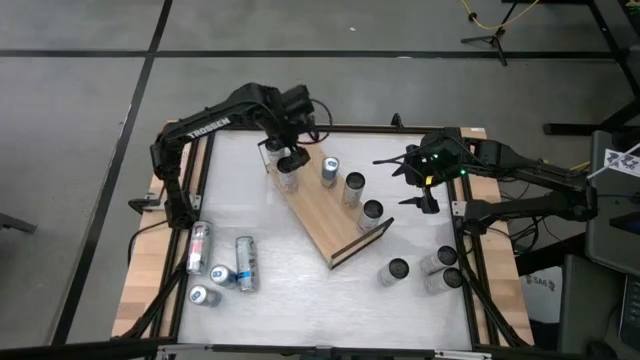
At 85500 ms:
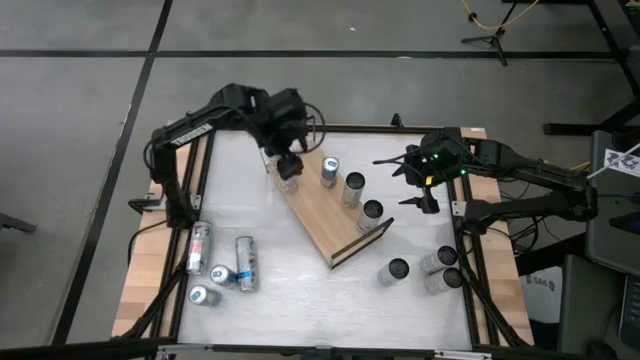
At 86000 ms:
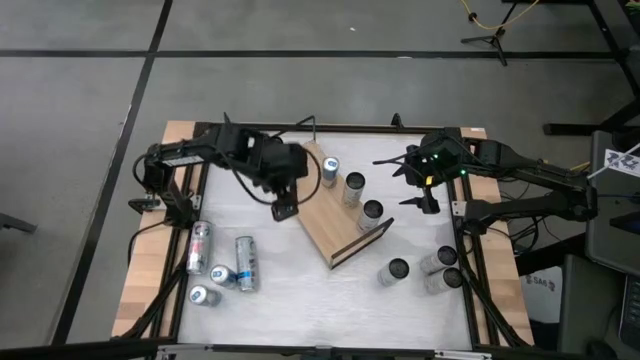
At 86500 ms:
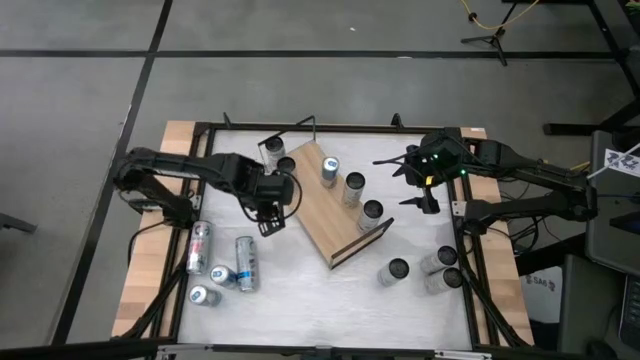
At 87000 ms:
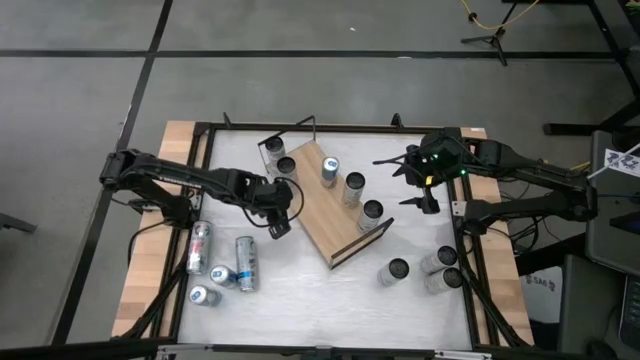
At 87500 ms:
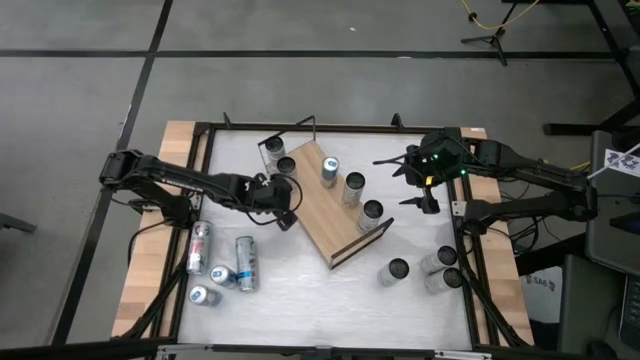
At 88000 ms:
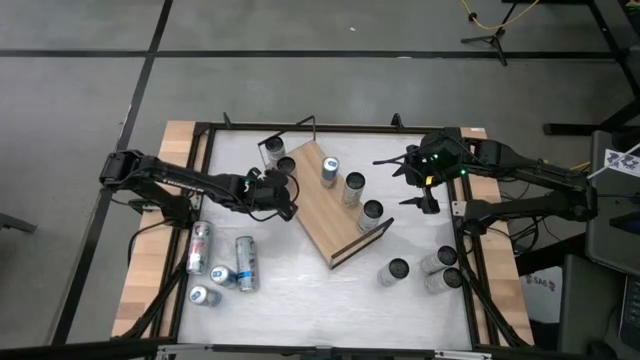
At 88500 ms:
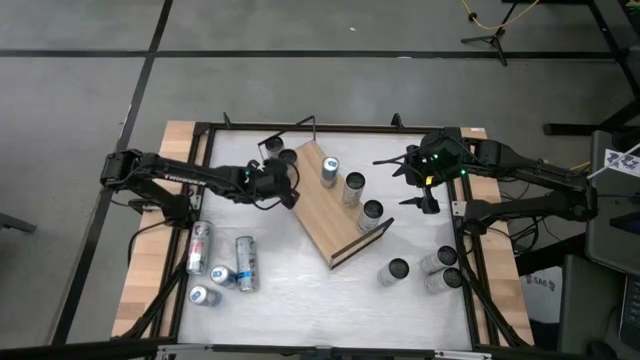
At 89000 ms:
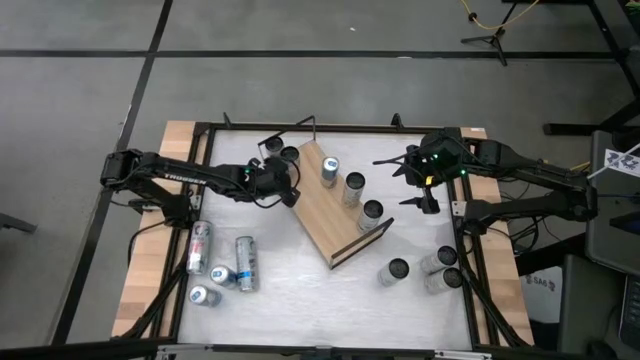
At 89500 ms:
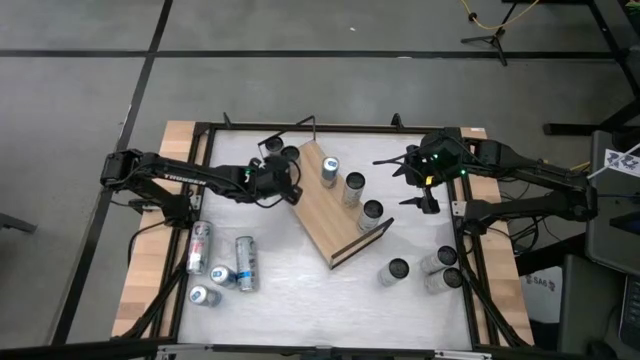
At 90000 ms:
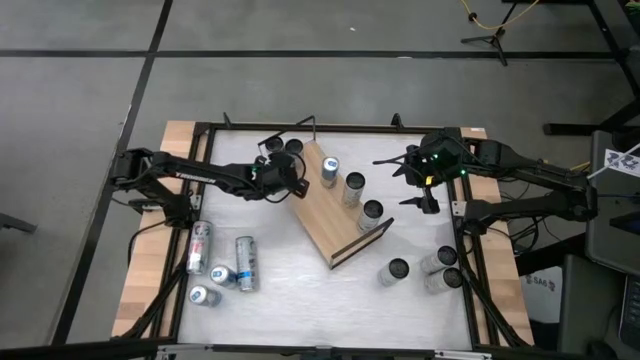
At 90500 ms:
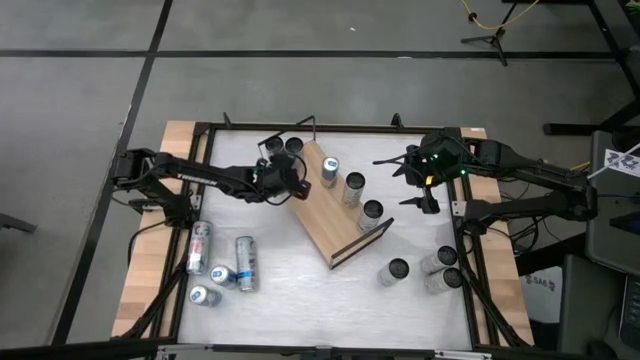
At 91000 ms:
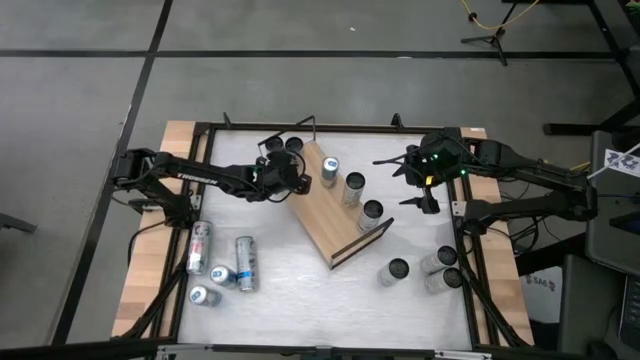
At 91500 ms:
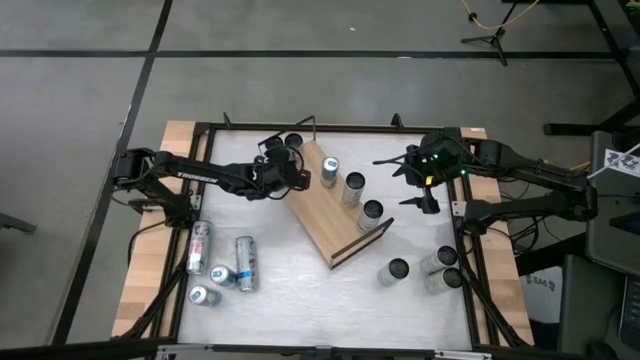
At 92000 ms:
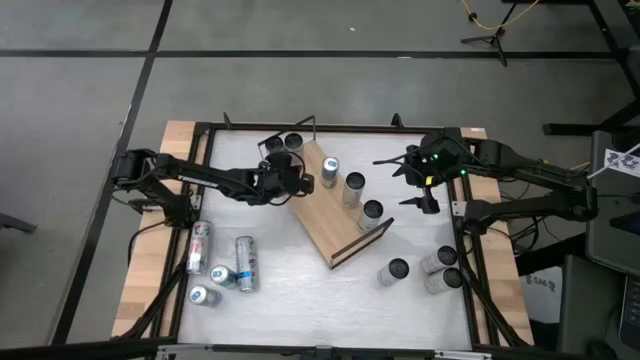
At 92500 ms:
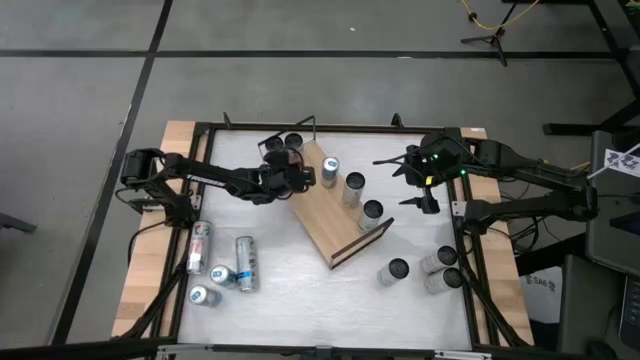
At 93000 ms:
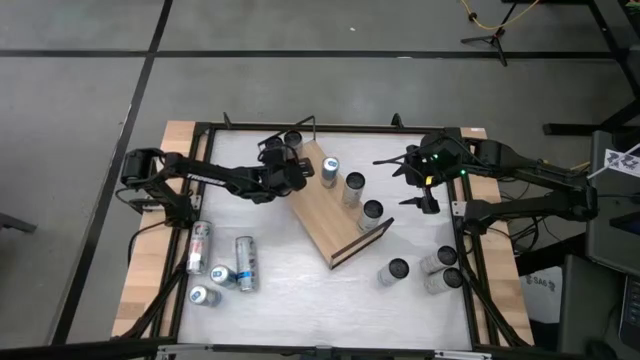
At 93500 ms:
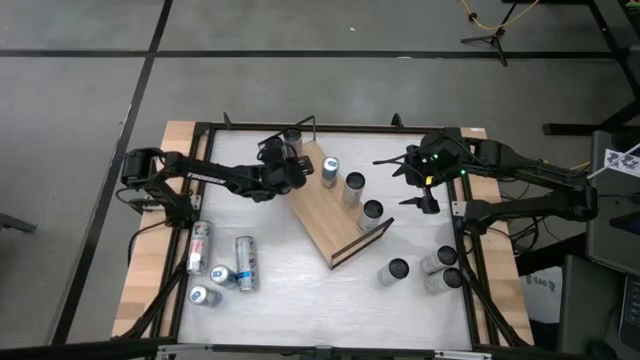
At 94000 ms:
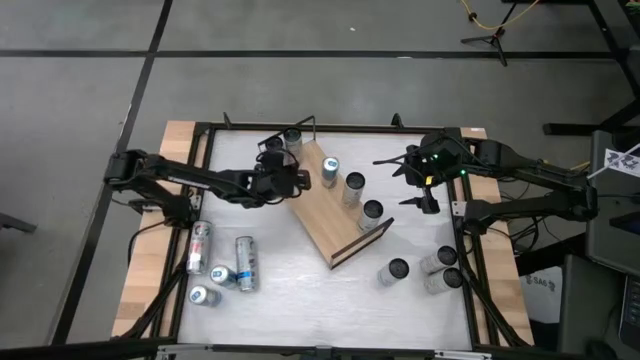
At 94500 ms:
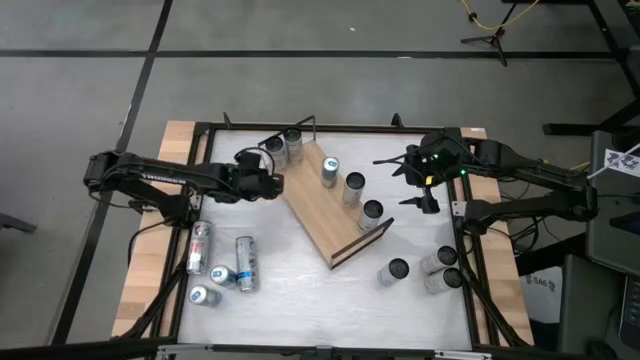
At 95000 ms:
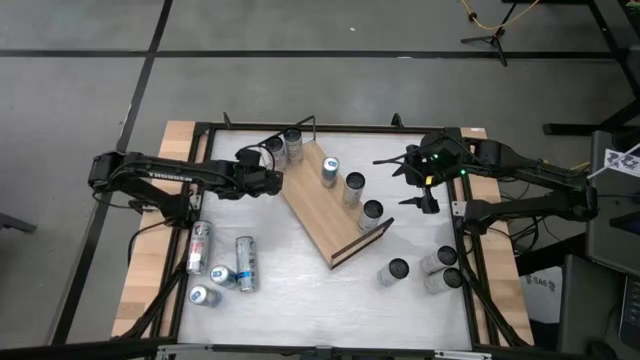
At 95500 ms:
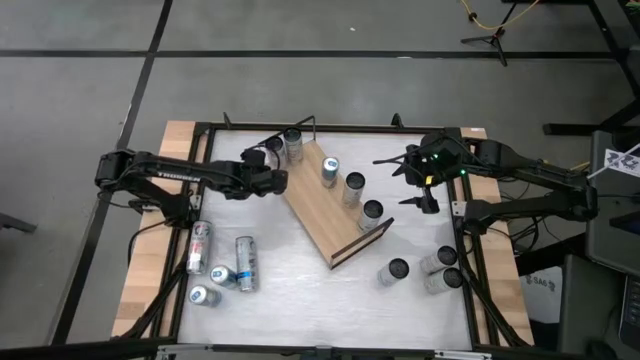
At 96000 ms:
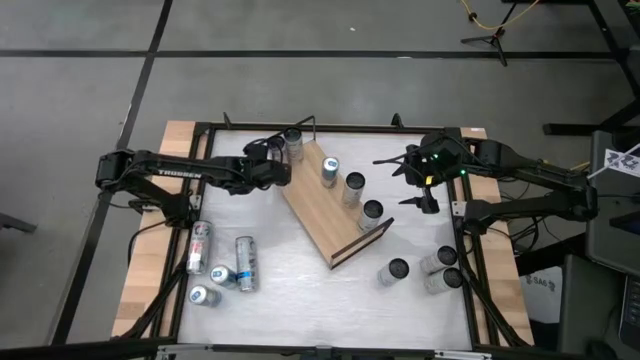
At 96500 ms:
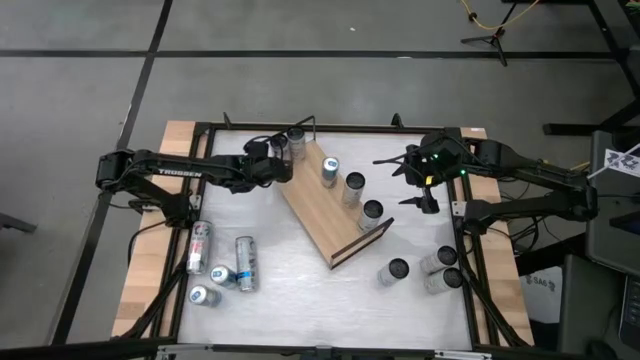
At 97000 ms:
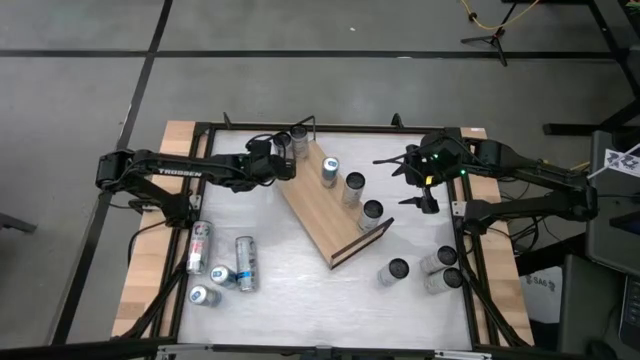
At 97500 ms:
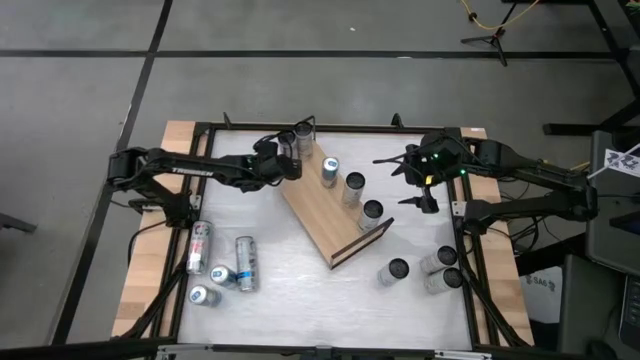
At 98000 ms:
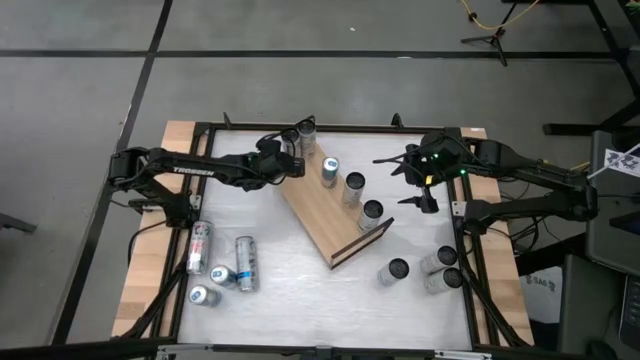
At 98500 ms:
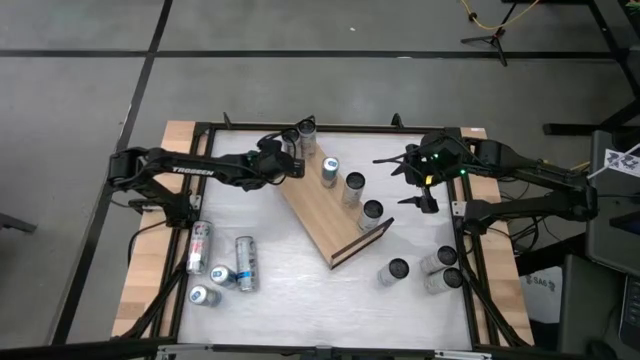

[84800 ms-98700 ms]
Task: Place canned beverage on shelf
Put the right white-pink soda can on the shelf and align with the other white-pink soda can

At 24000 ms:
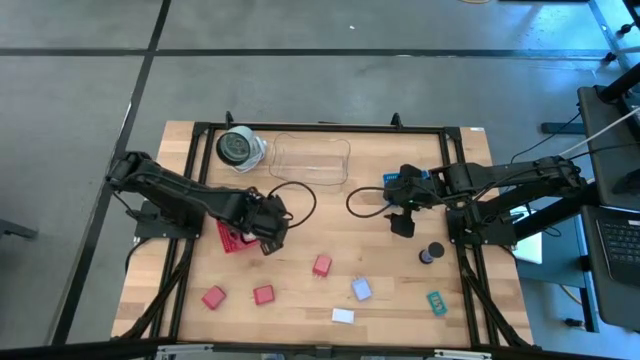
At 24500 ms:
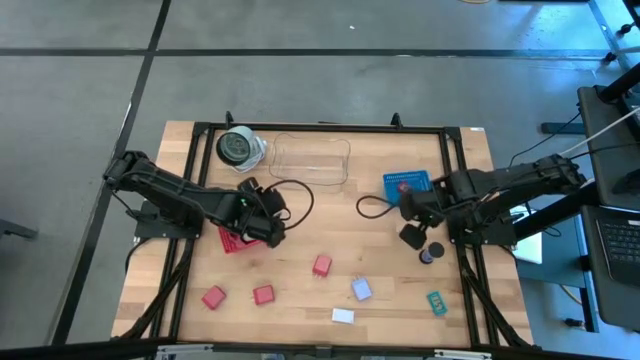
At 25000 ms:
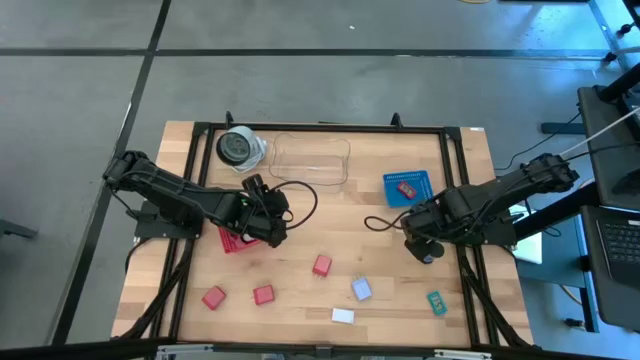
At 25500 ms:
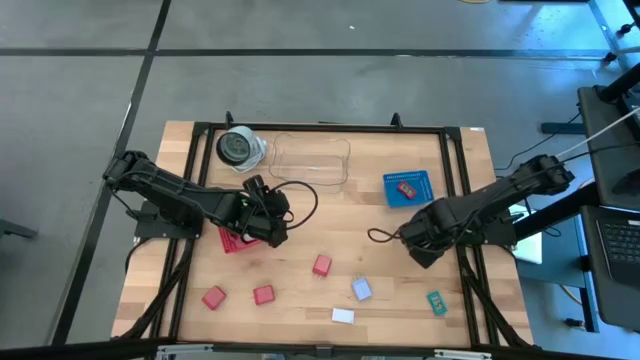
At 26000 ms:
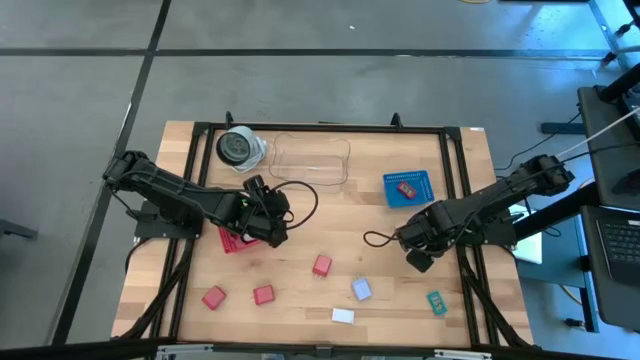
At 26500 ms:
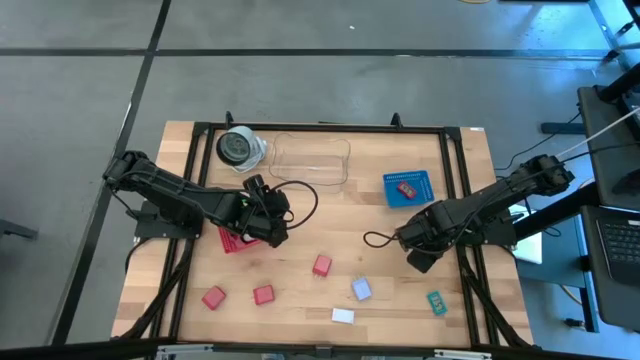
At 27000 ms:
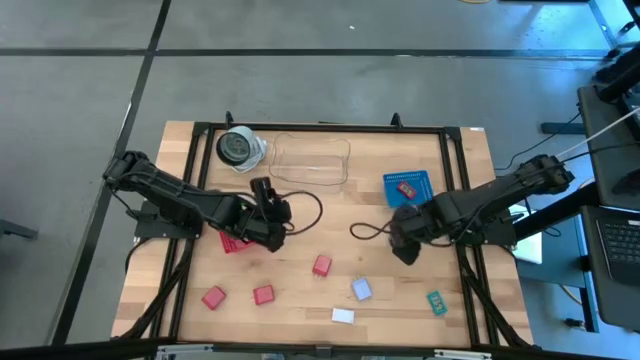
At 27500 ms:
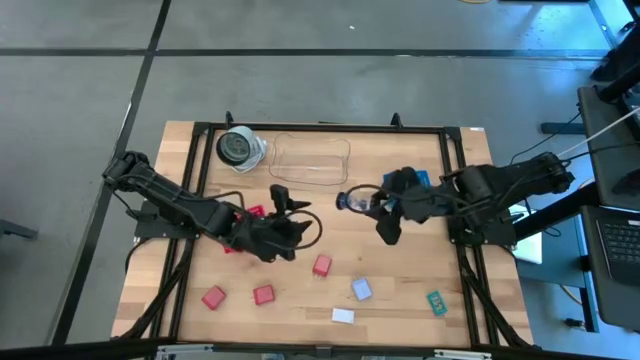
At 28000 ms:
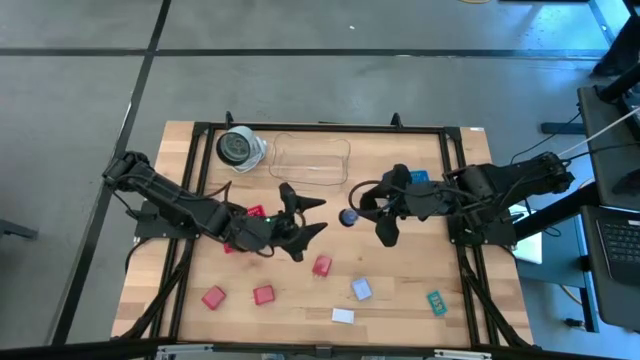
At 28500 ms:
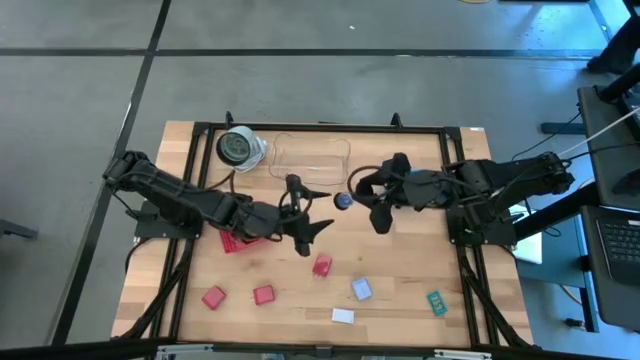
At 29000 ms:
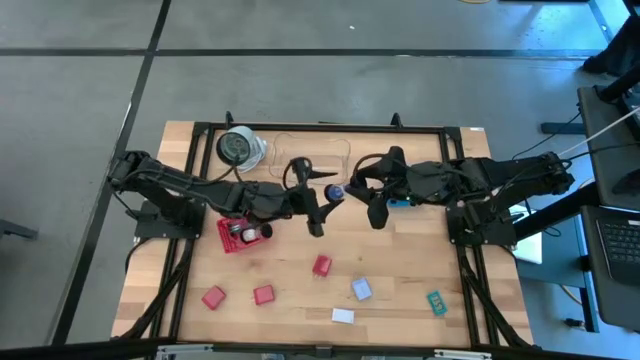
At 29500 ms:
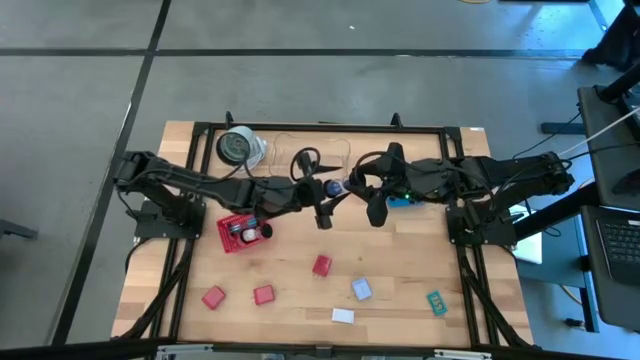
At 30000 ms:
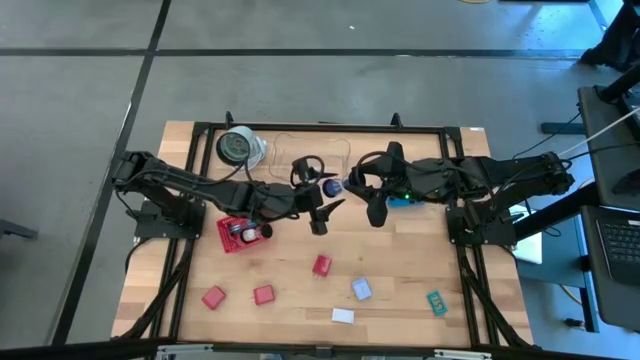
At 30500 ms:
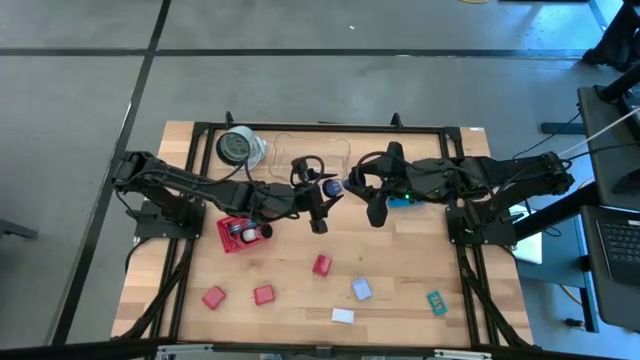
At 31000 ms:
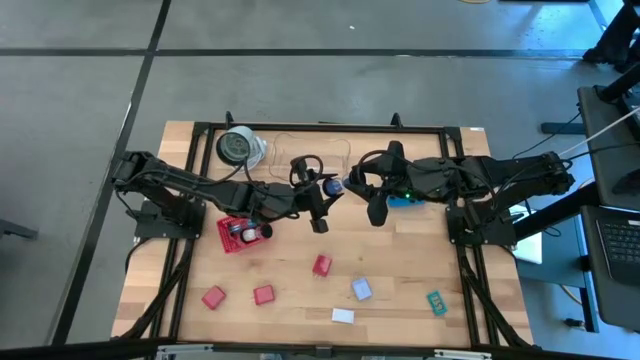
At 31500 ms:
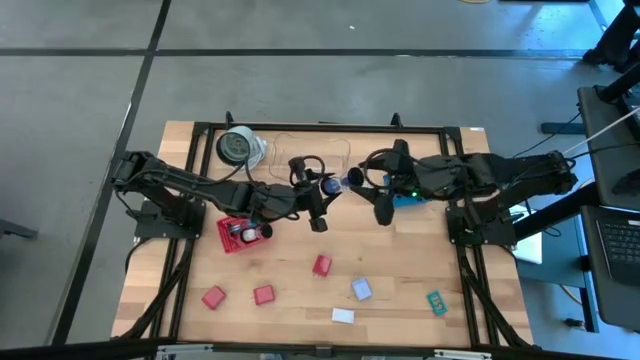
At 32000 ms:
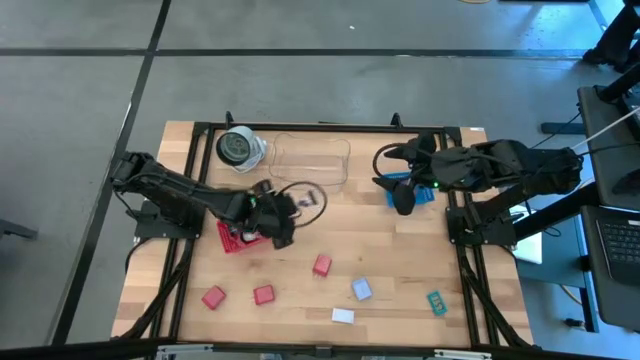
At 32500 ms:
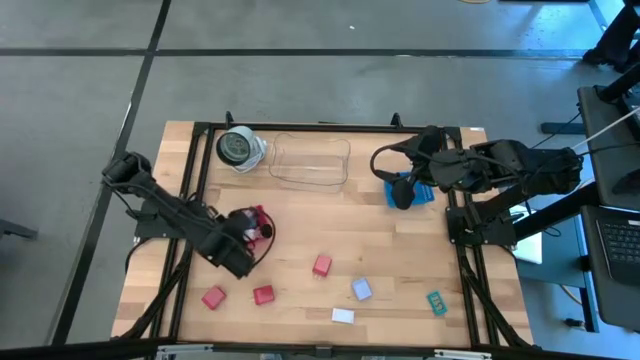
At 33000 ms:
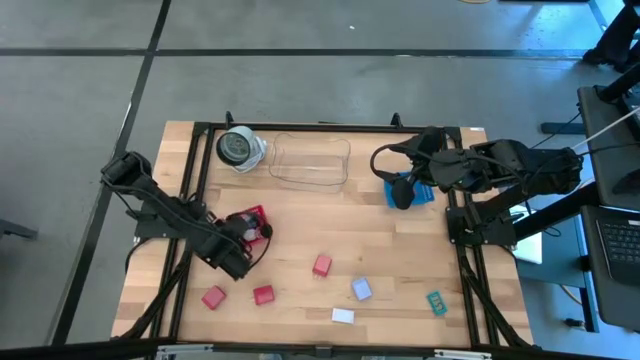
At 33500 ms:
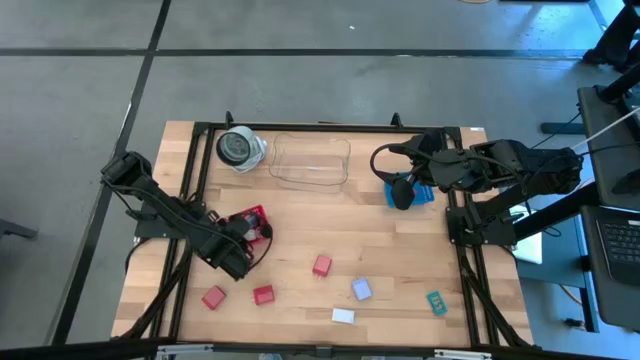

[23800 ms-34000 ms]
Task: Pick & Place Office items
Put the blue hourglass into the red bin
